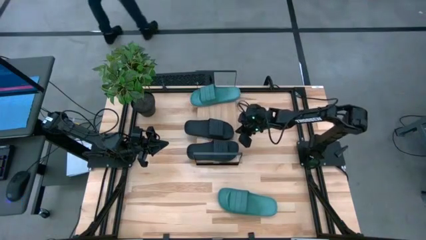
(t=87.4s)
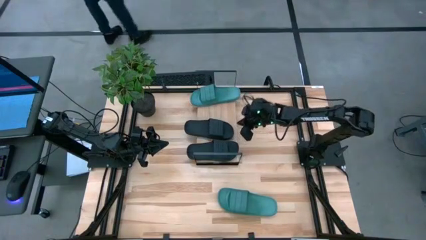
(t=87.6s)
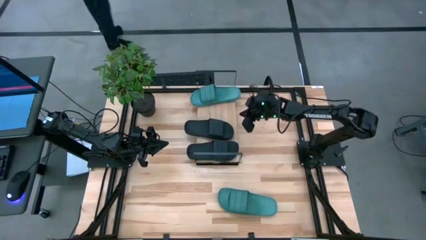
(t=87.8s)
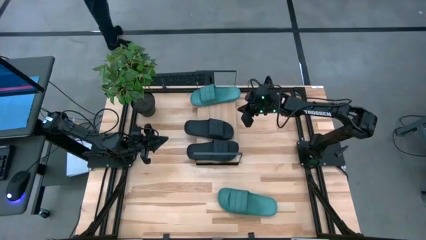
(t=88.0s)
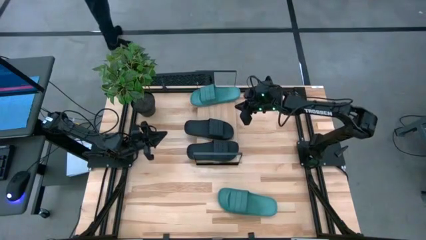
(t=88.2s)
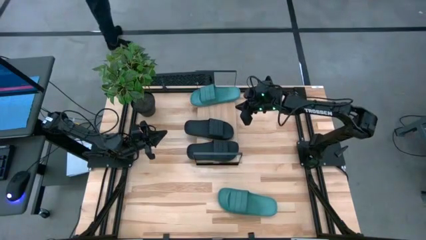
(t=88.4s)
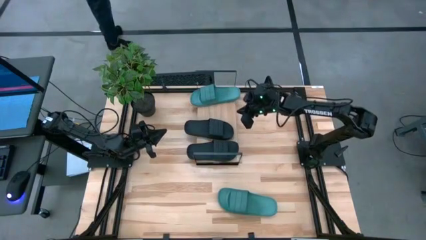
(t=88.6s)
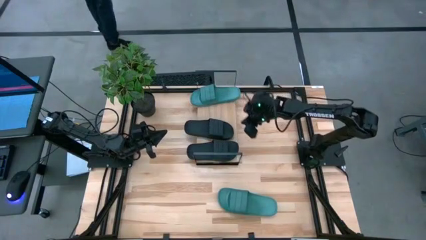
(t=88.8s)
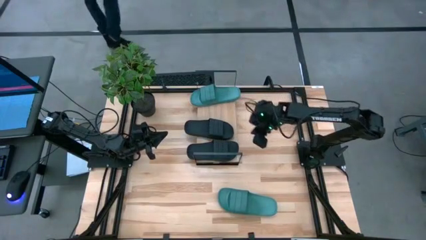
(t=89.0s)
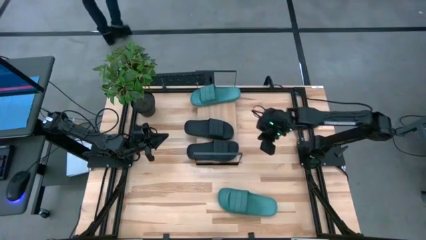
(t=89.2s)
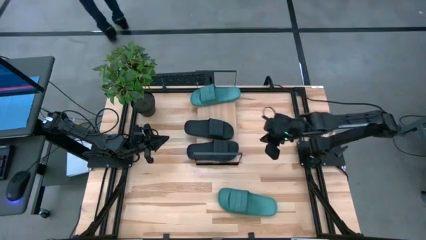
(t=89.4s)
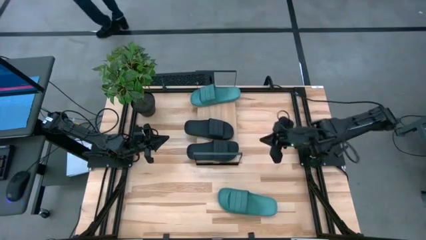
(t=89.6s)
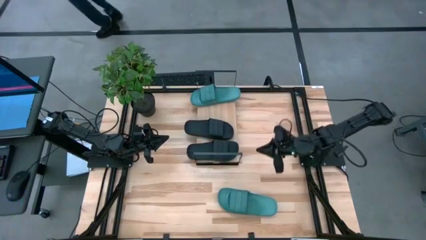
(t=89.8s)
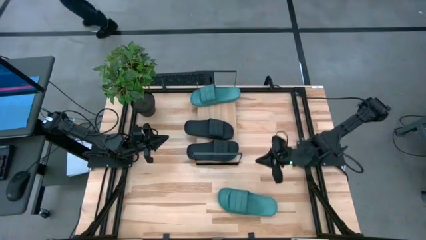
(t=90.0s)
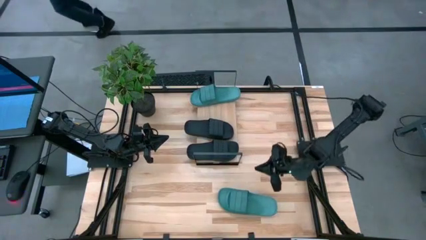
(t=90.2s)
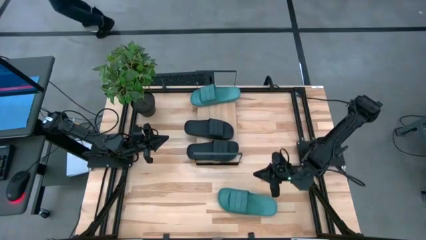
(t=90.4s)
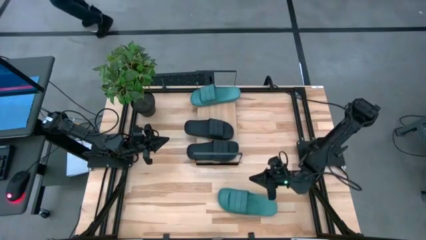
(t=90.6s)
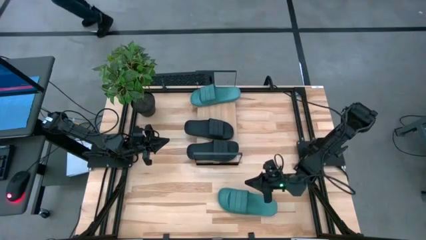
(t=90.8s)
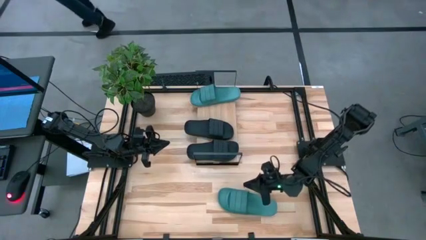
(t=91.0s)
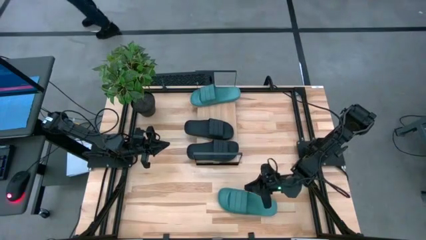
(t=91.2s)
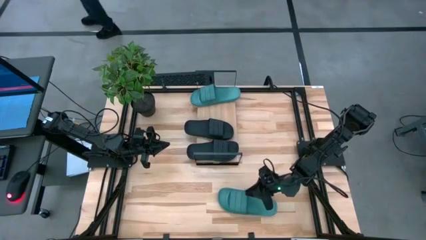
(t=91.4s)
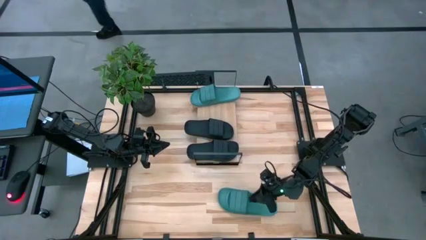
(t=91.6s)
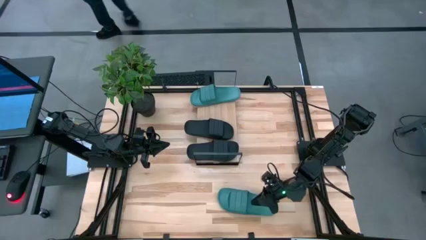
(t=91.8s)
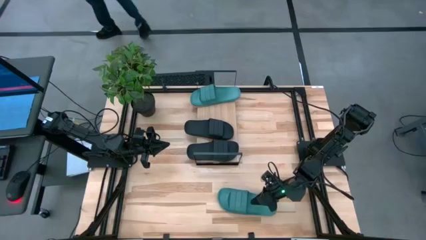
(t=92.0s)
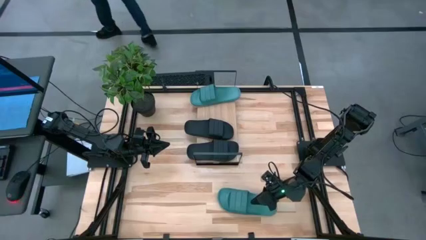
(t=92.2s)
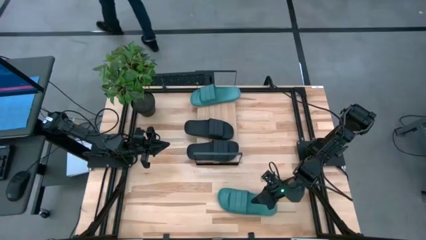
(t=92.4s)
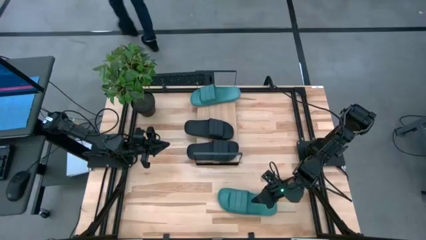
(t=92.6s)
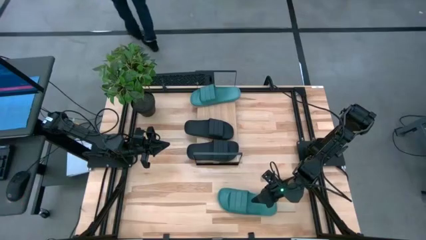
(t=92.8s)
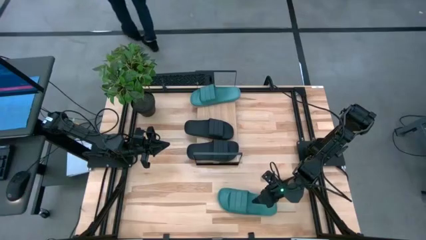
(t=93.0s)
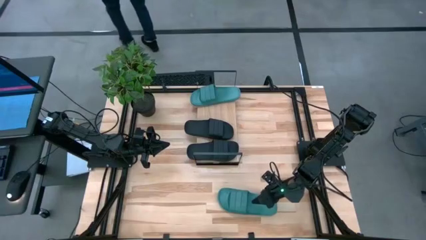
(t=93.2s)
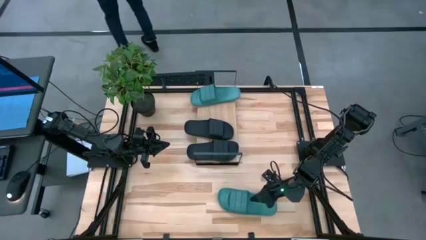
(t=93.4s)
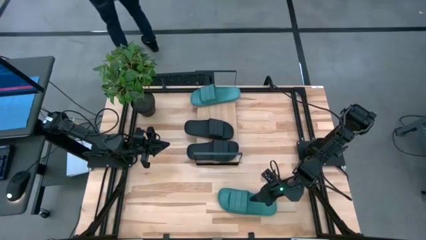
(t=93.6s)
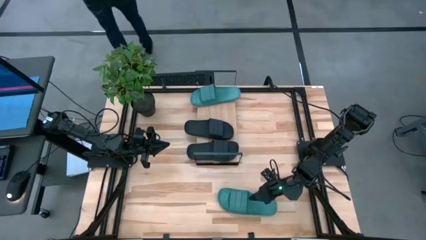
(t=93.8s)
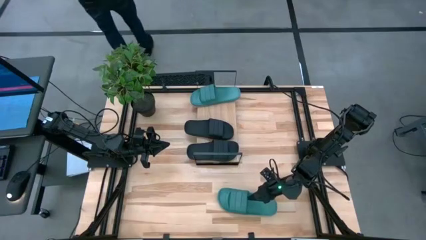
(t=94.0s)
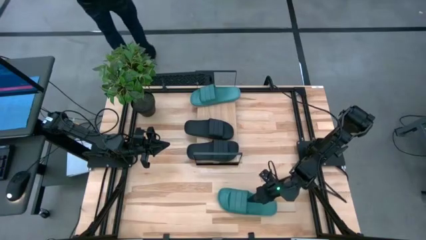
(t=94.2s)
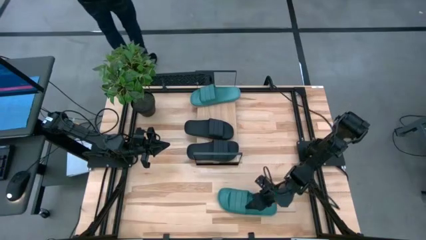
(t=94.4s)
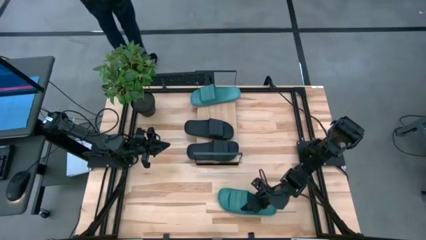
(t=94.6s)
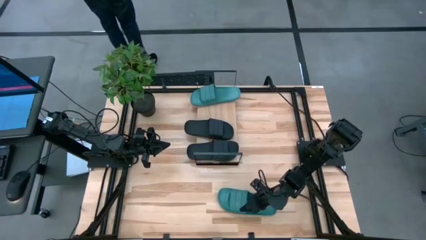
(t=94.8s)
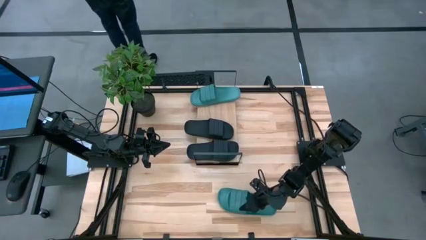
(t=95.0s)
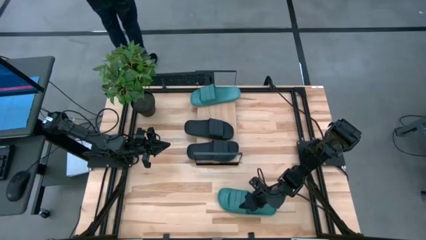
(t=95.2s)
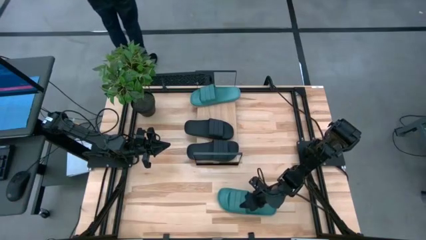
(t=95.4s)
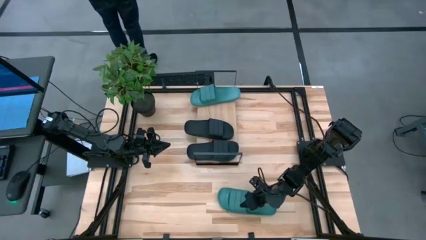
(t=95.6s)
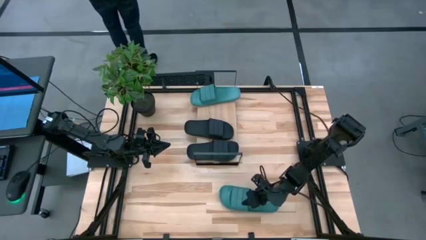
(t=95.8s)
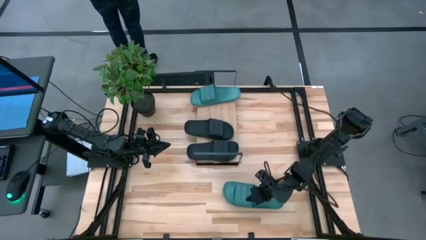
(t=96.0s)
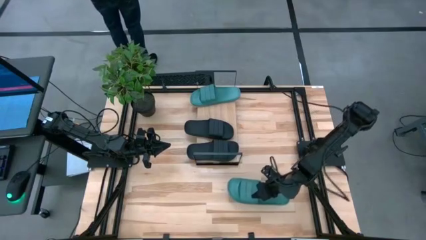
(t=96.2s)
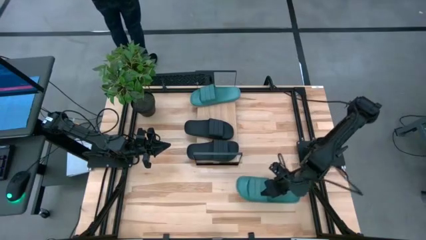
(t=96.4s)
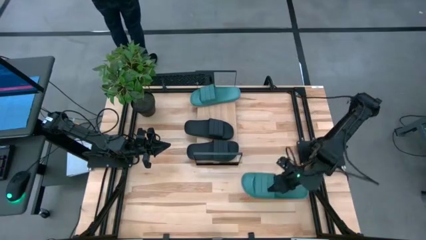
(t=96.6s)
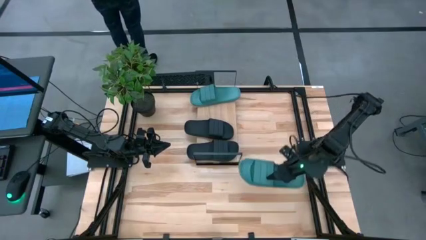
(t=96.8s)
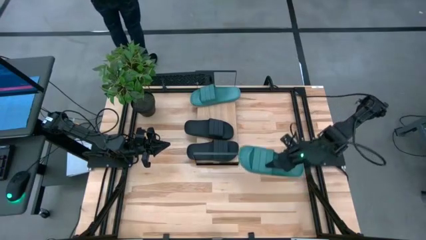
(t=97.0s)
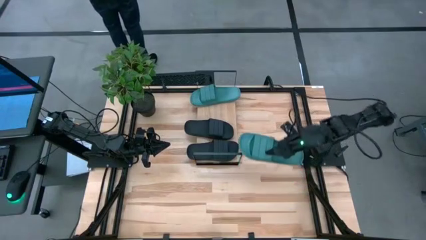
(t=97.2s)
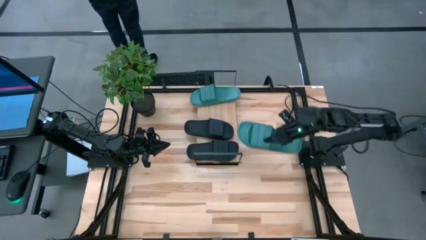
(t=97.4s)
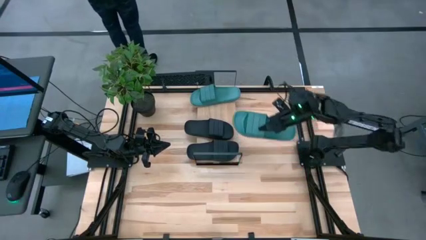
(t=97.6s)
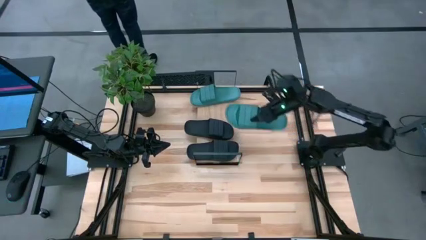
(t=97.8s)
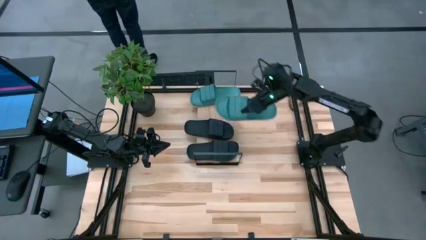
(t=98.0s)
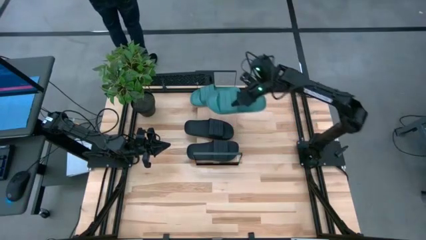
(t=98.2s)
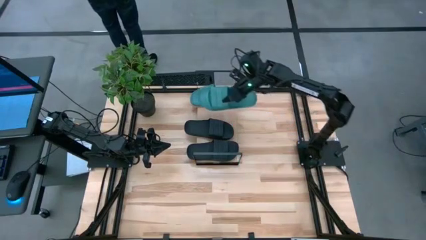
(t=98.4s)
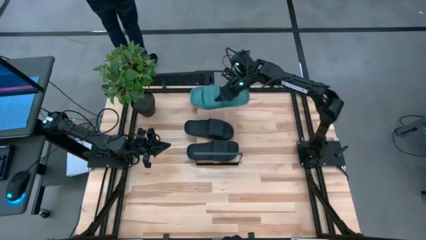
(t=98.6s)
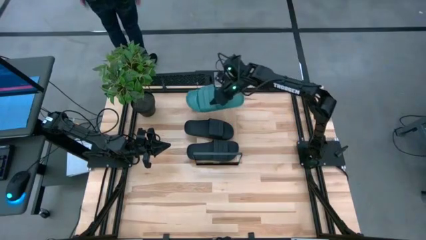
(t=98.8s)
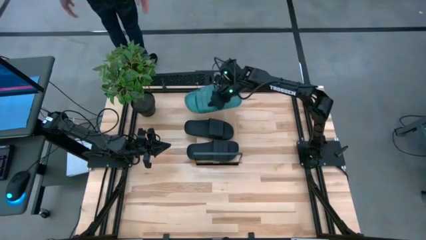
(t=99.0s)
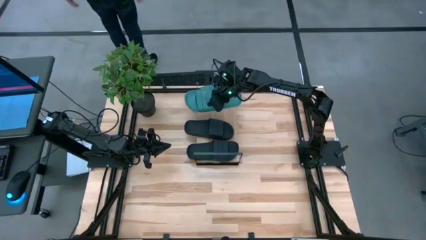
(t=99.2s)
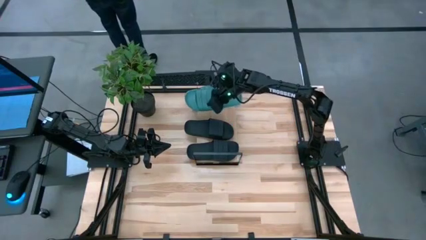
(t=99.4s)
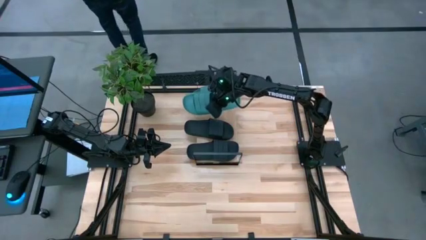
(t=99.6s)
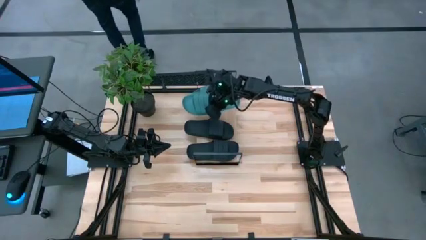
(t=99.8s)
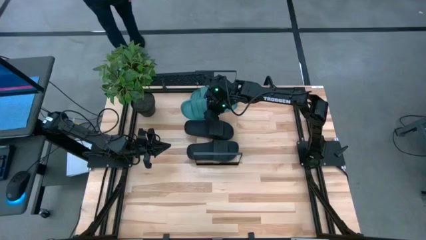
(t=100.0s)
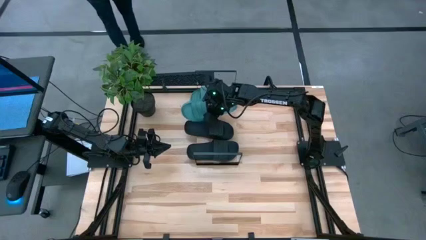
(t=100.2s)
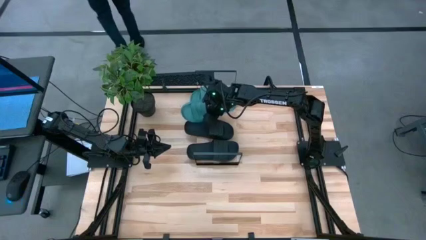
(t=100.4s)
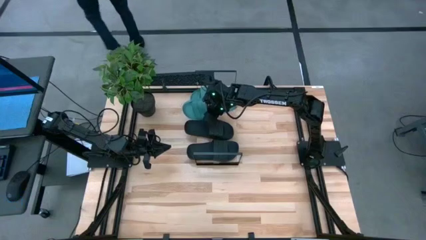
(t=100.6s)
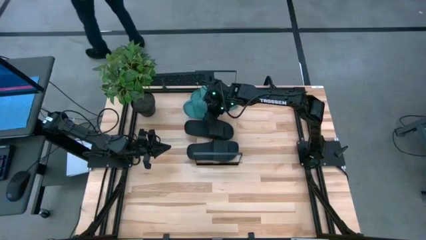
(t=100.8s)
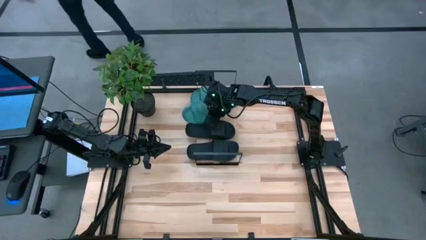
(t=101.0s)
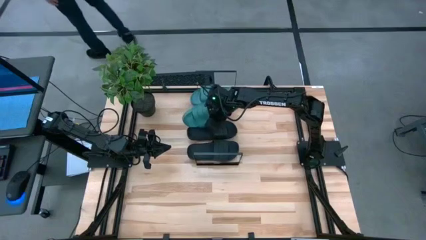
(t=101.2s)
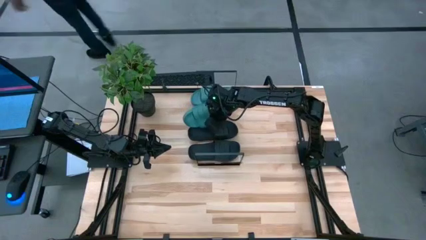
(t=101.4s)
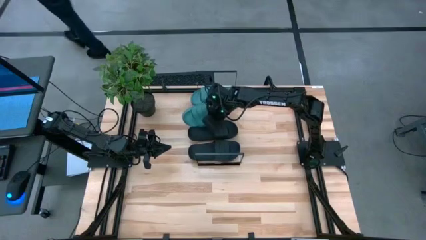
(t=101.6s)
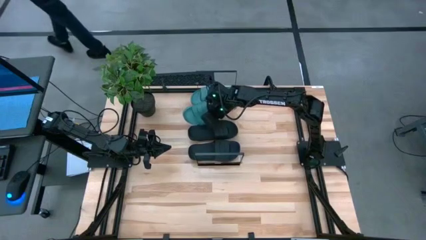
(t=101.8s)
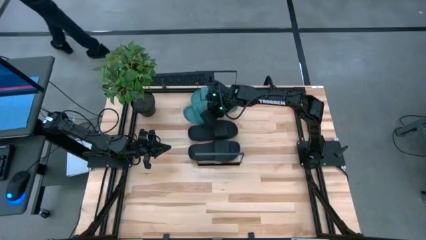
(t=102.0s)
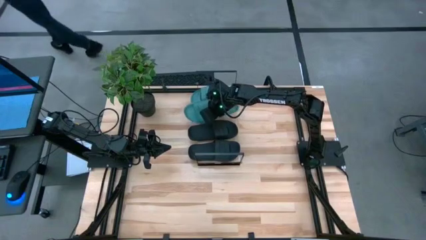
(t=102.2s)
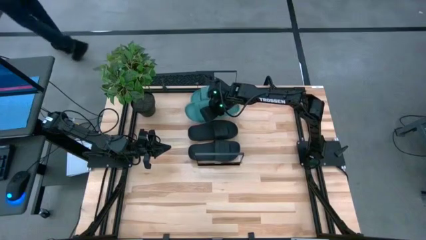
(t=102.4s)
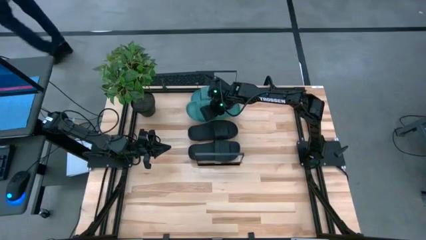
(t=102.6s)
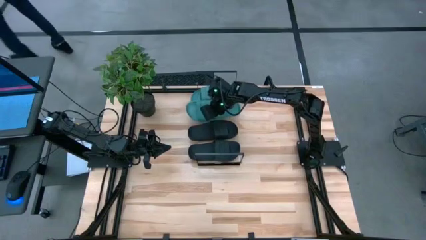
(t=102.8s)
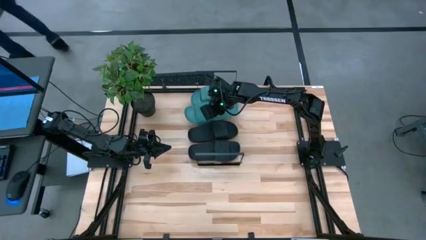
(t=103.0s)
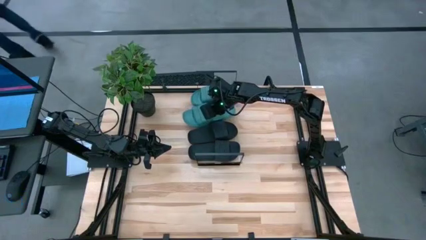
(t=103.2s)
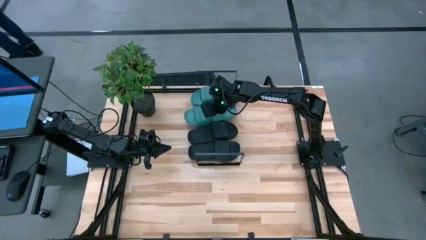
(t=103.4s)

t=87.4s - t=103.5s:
Task: Pick and place slides into the shelf
Put the green slide on the shelf
